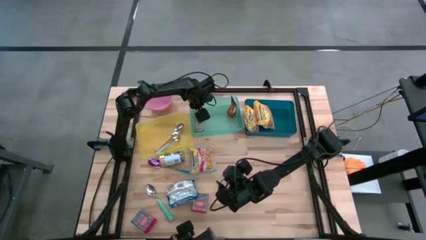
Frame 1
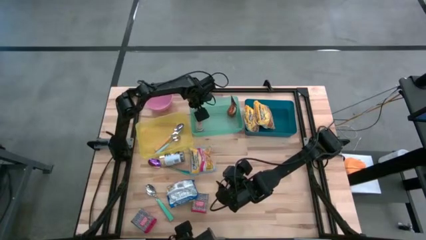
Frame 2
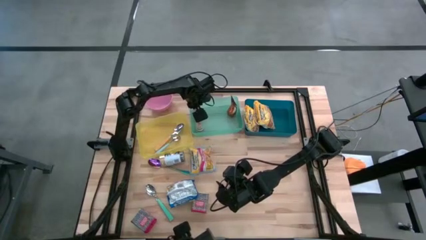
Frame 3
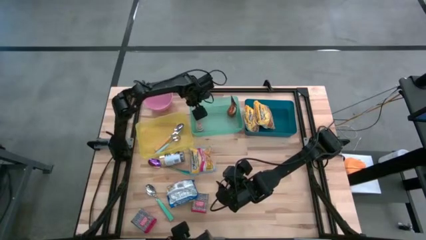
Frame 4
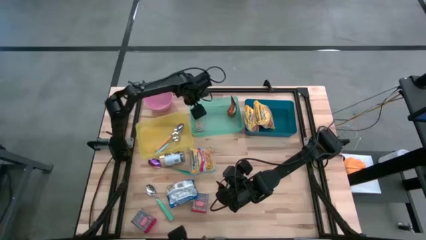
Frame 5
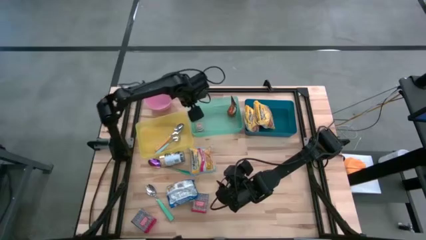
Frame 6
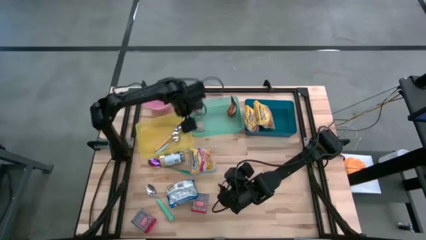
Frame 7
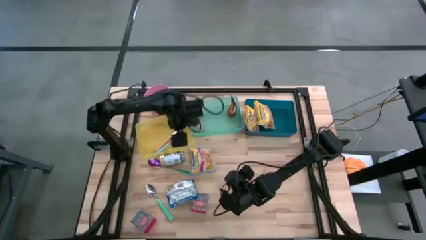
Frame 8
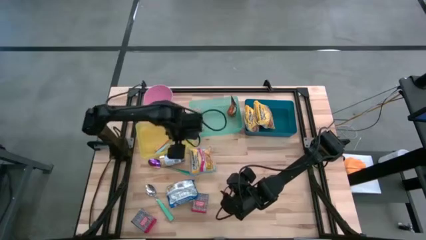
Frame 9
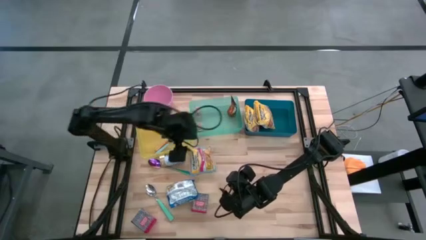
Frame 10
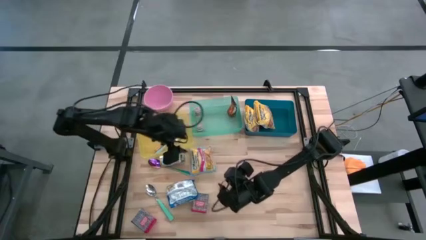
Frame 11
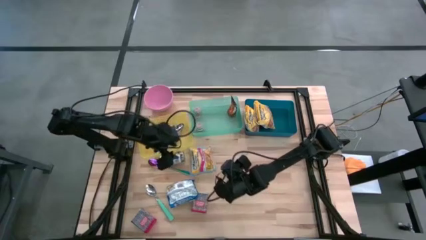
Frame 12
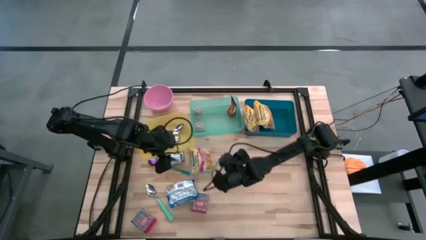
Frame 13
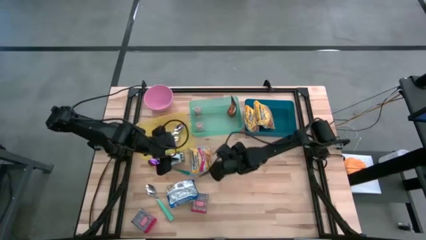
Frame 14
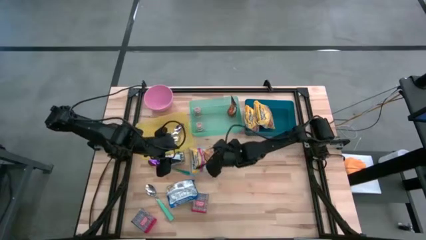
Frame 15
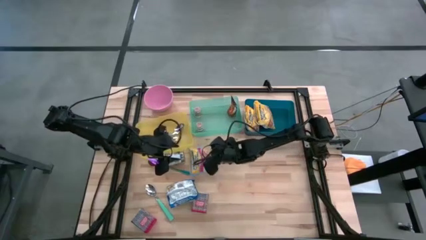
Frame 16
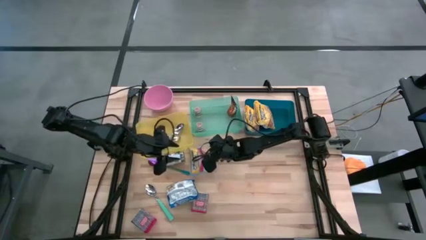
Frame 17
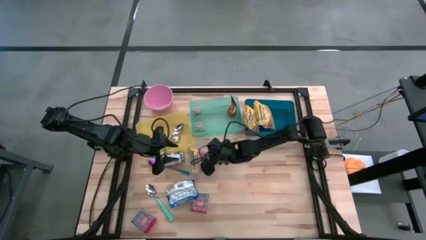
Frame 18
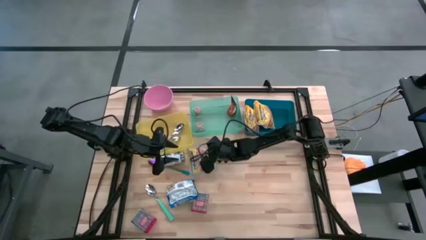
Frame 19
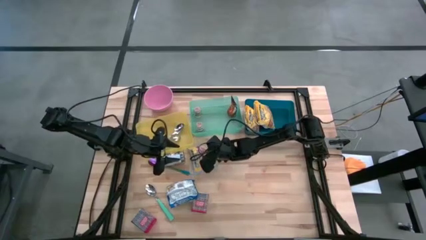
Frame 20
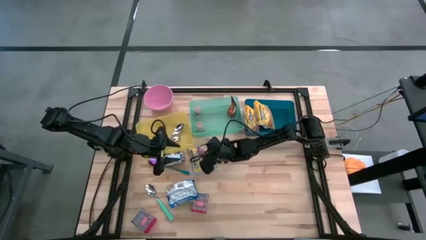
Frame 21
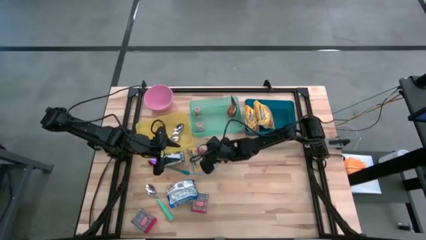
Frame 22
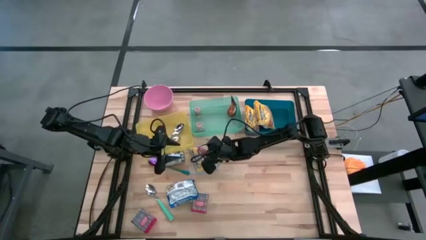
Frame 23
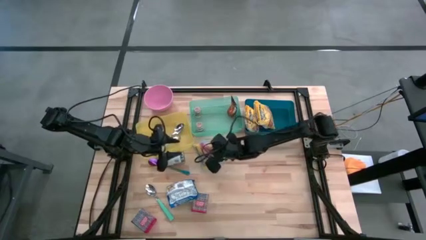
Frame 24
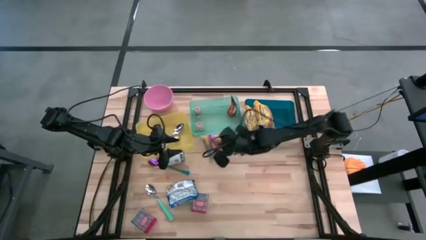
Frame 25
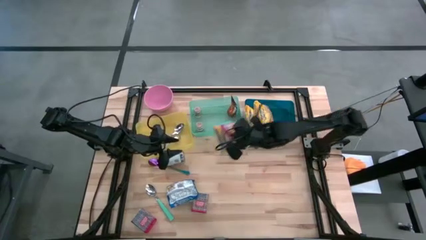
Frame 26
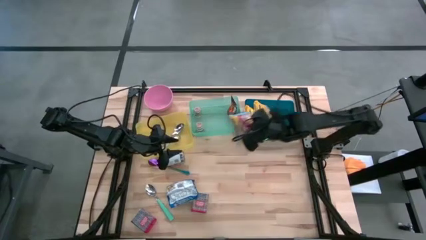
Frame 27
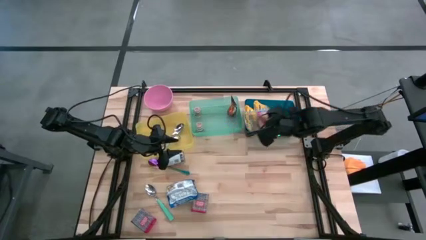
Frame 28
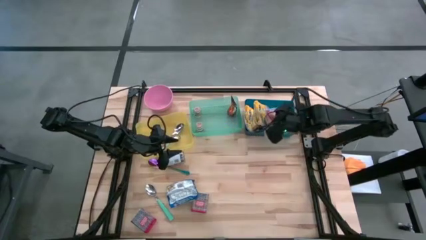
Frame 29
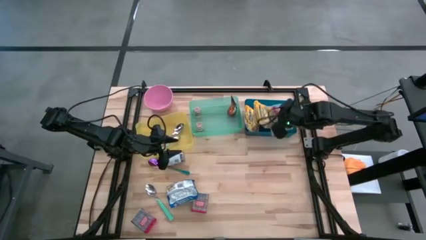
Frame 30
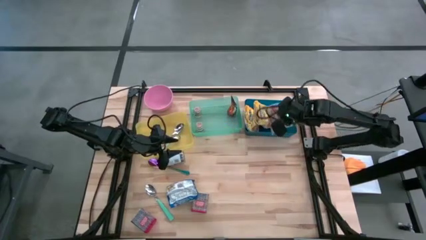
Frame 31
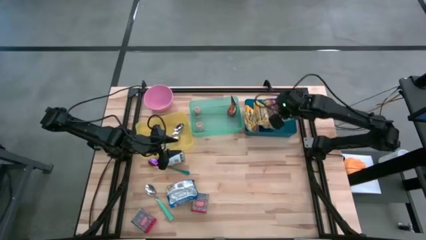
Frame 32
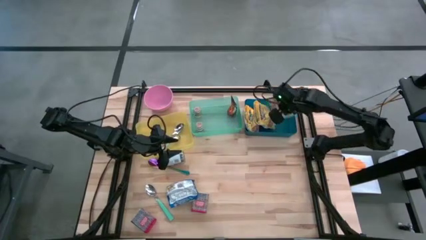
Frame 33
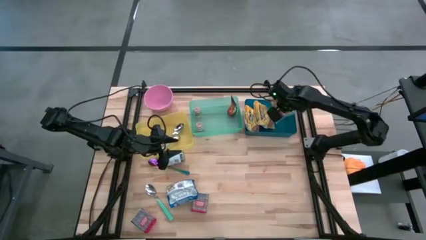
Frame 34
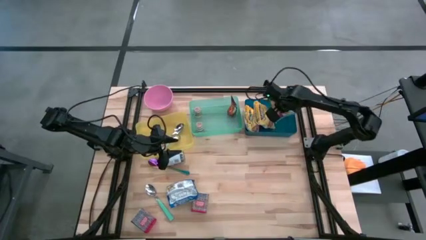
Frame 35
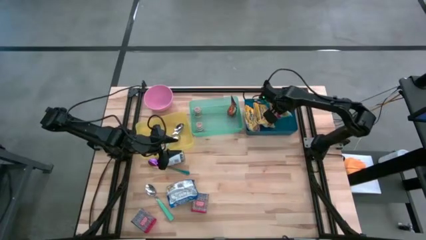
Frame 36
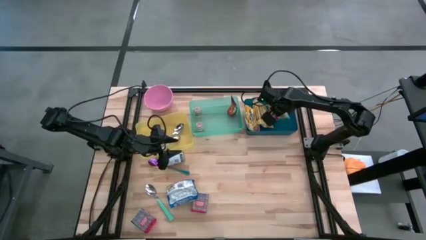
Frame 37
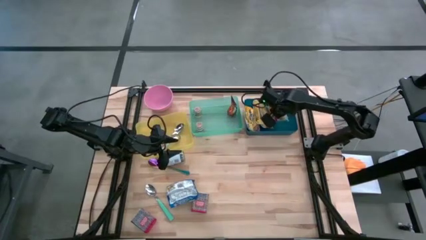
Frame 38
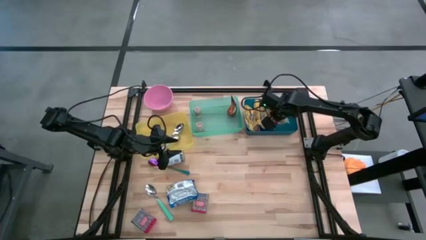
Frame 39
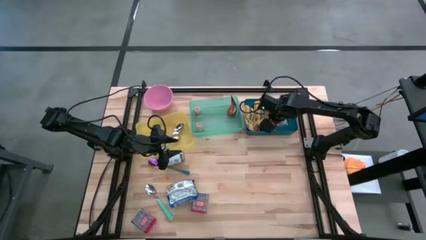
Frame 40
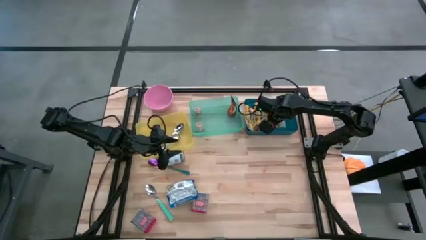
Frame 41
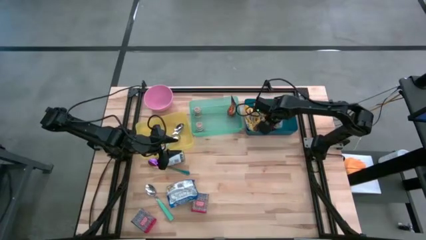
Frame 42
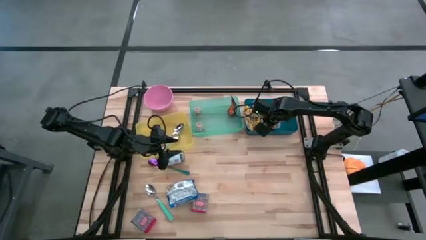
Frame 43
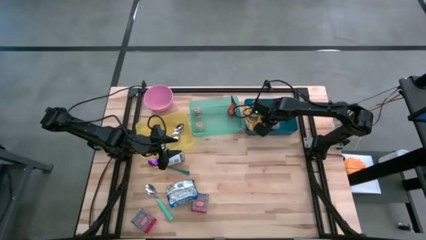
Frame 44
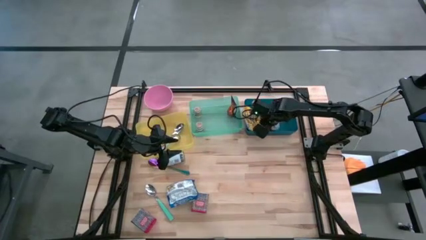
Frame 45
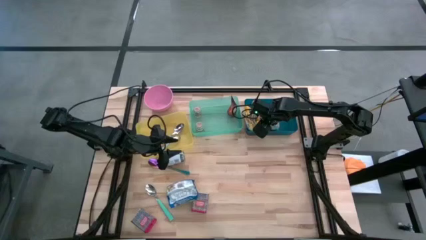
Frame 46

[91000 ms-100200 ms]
Put the light blue noodle pack into the blue bin
